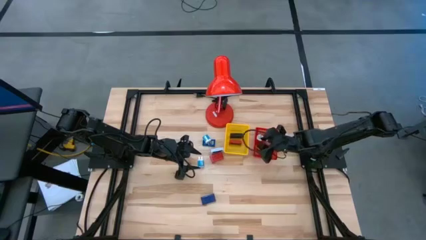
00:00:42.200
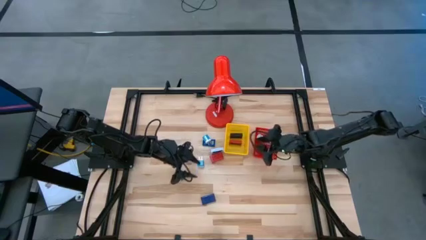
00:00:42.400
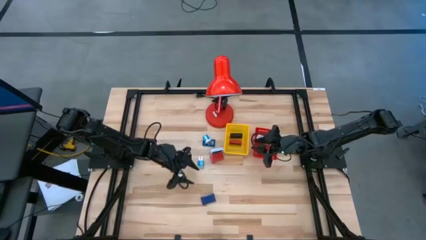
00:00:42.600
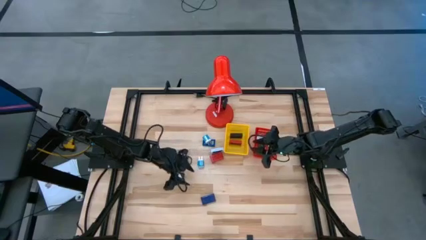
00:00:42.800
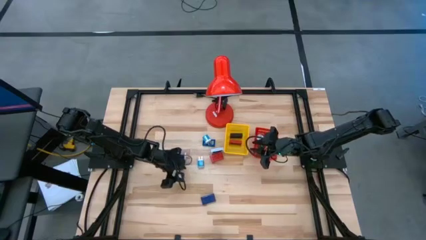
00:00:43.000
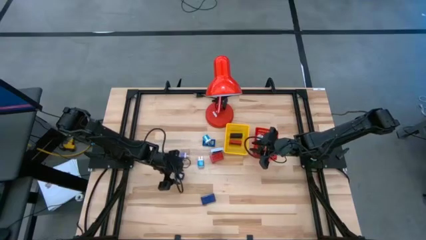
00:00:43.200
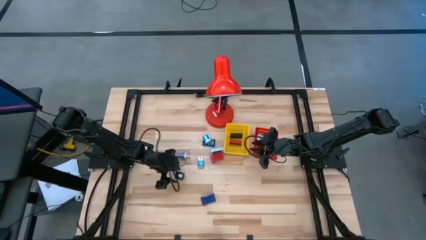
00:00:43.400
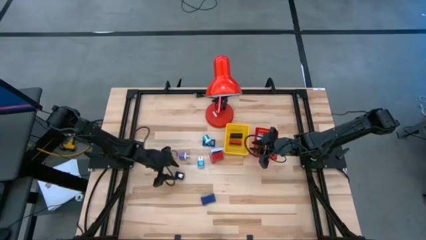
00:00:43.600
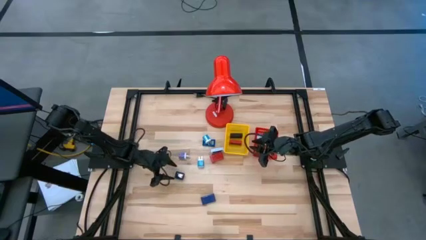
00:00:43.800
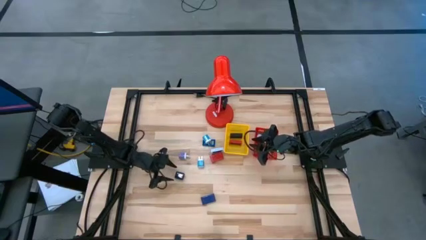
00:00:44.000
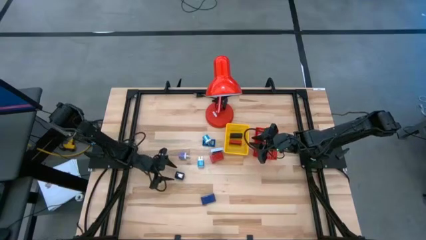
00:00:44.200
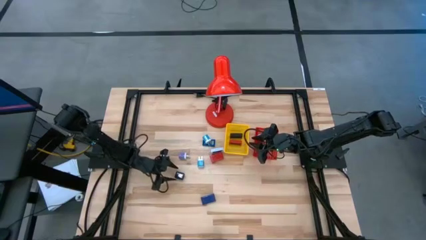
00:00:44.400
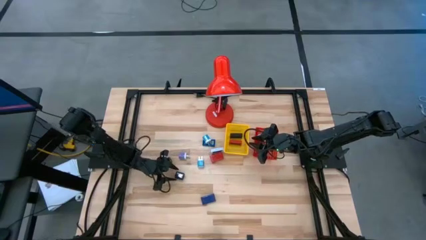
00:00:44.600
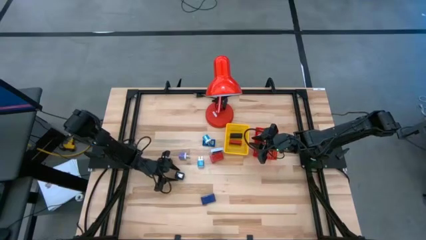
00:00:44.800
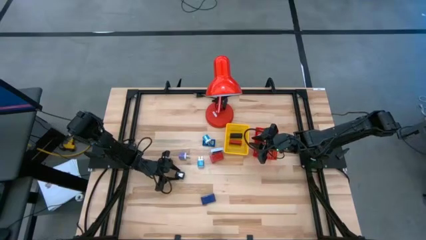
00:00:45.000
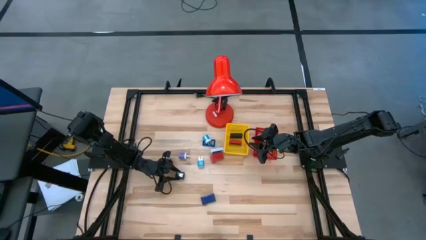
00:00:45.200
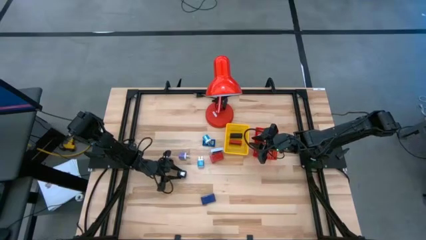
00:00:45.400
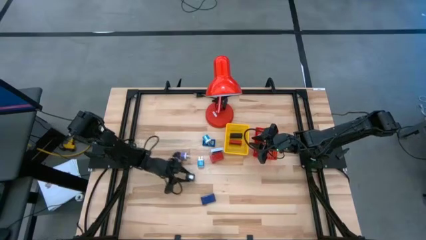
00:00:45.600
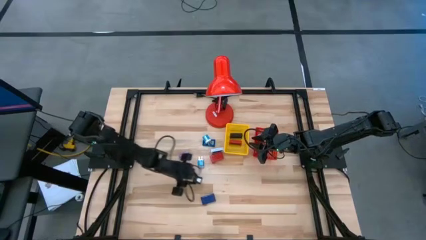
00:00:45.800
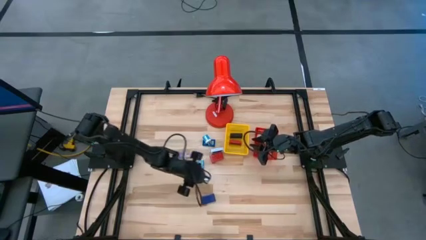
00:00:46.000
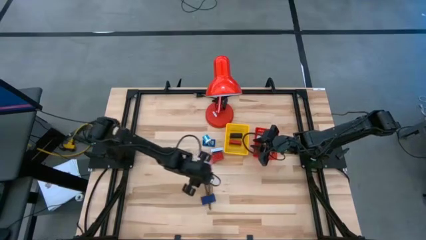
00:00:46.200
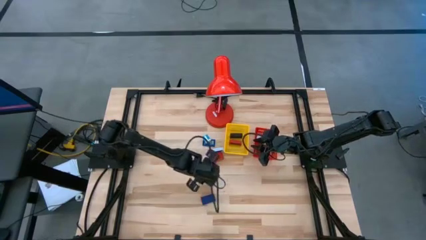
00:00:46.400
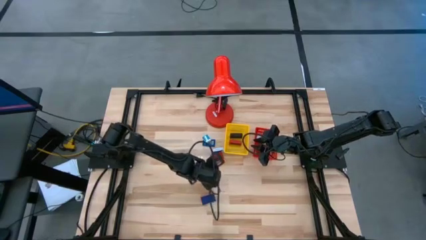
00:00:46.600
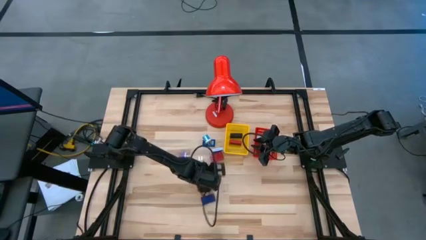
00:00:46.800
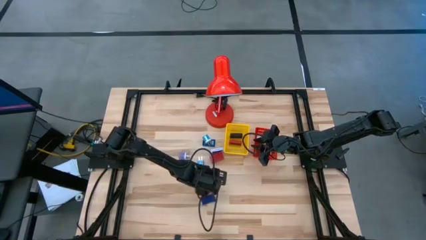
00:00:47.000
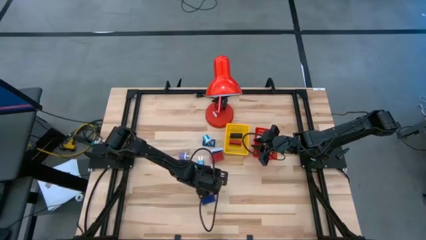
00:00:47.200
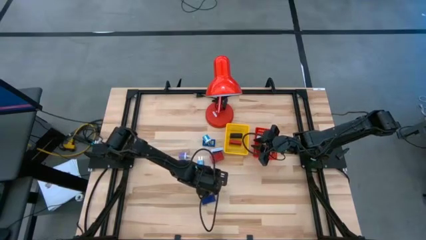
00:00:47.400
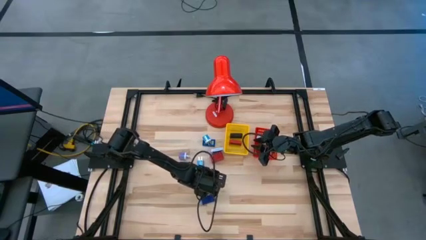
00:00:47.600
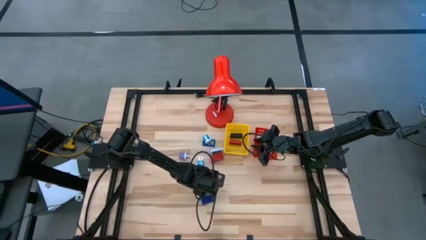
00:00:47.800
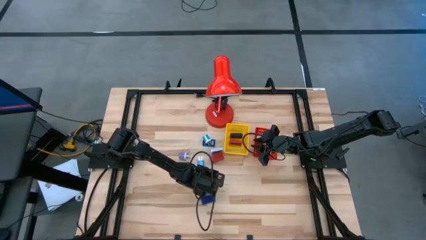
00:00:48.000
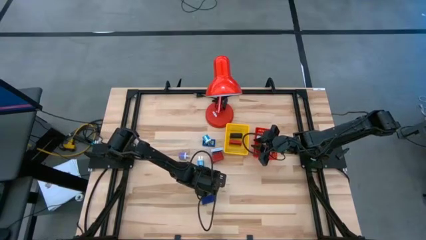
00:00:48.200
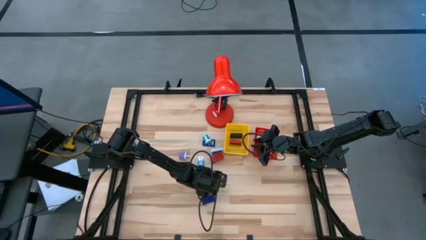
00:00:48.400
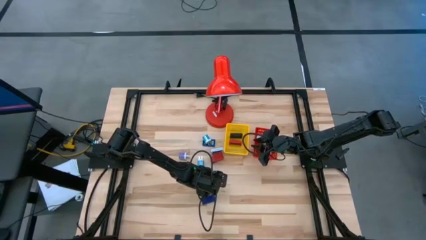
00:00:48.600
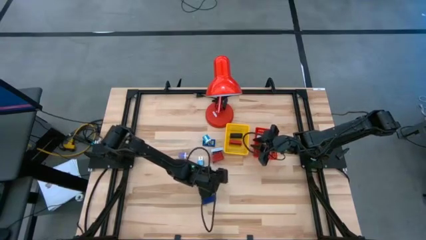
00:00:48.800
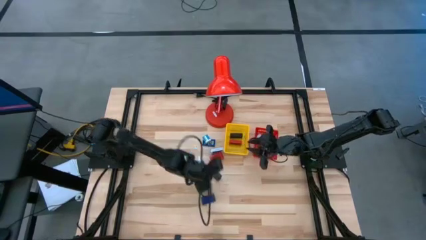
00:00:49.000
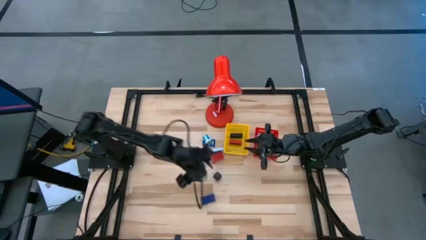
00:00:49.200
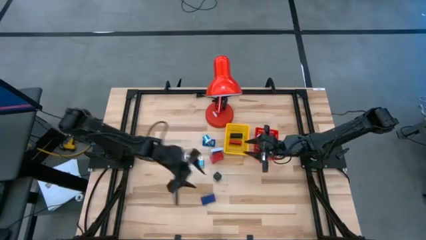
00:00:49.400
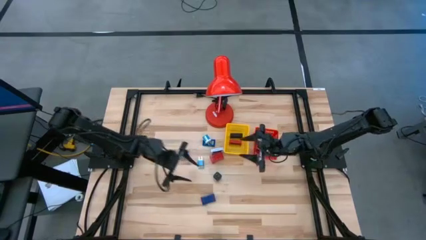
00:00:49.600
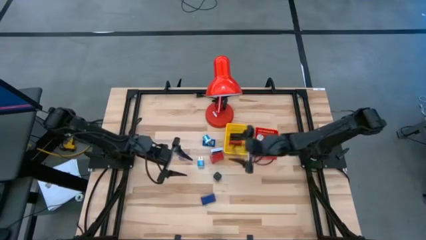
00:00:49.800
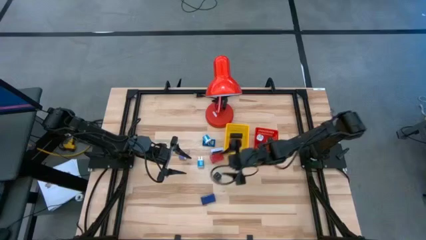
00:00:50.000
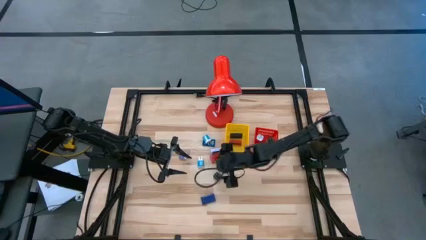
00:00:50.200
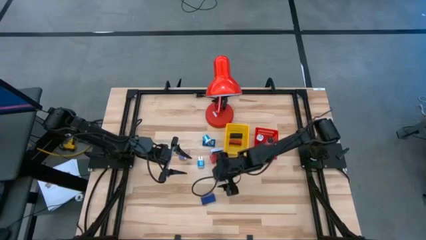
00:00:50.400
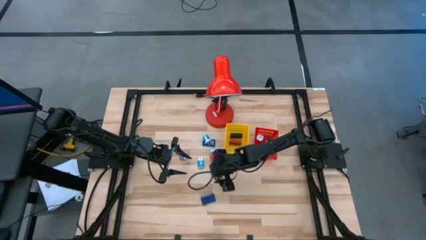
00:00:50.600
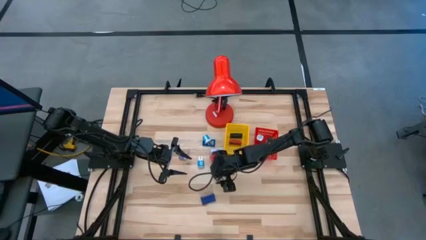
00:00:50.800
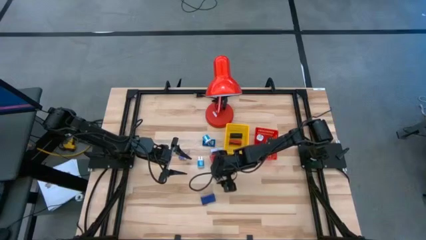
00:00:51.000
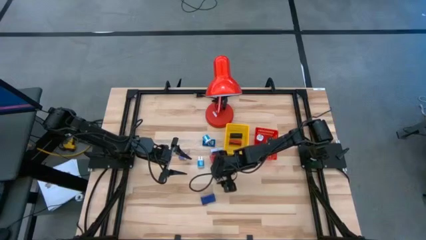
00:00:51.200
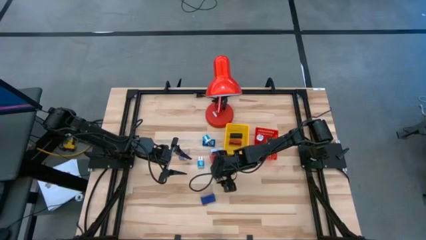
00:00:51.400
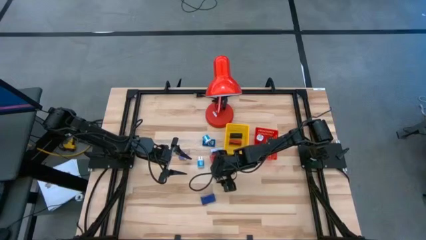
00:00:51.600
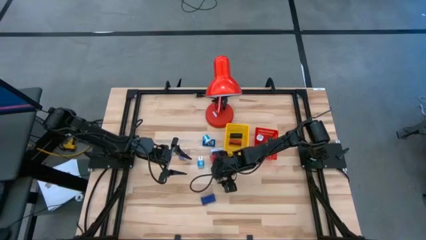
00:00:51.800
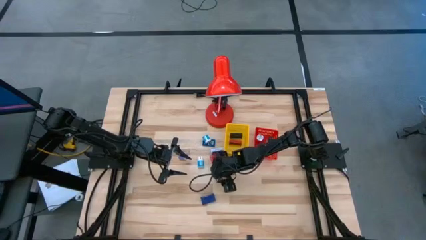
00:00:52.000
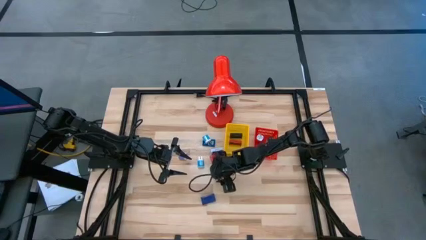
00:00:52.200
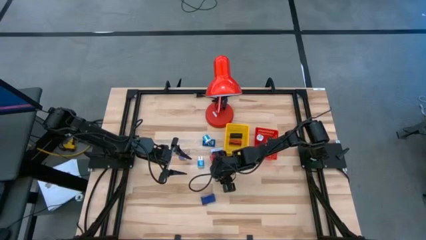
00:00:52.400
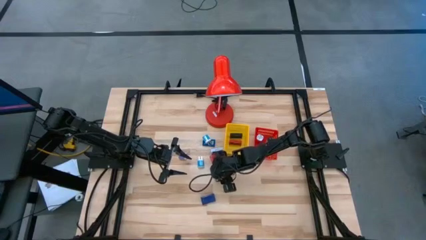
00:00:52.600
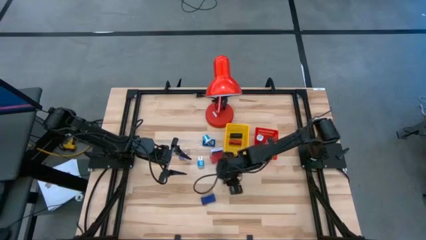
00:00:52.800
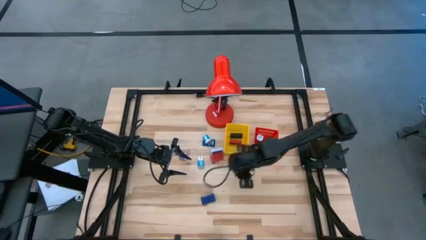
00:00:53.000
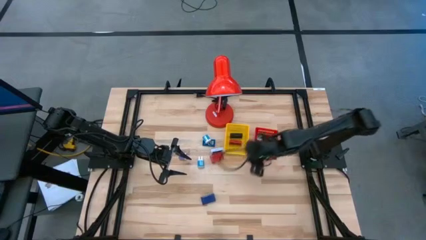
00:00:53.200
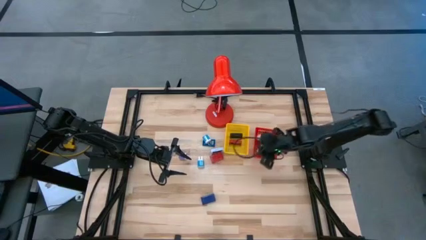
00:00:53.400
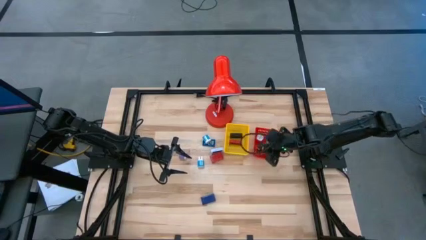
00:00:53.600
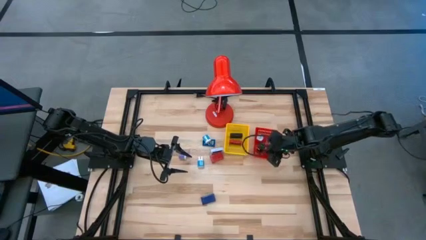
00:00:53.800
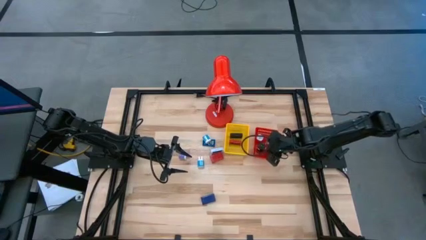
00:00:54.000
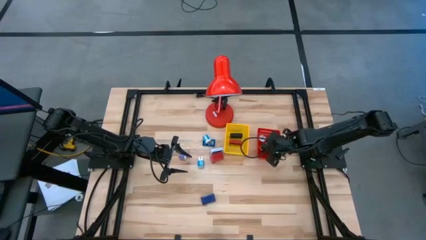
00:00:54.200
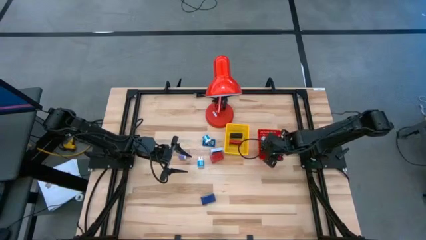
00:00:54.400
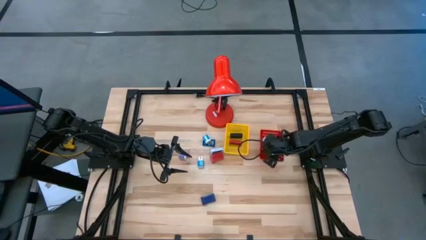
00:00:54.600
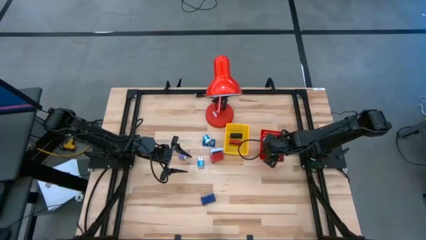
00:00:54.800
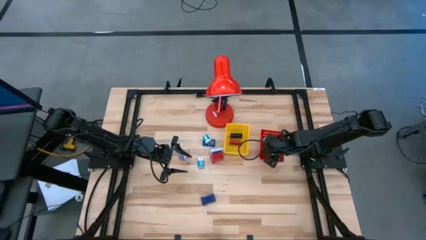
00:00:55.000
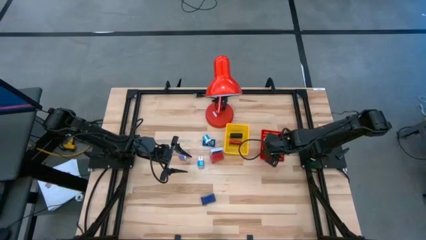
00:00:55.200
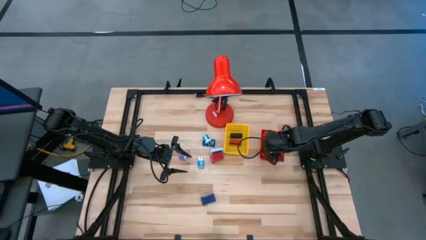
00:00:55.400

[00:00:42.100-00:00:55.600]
Task: Pick & Place Office items
Put the black charger adapter into the red bin

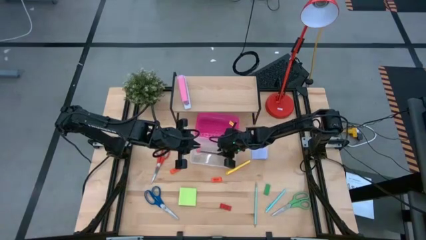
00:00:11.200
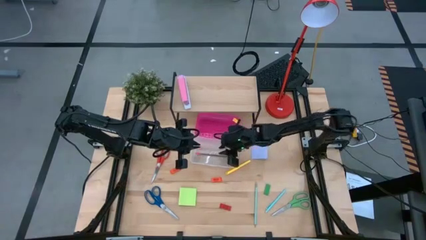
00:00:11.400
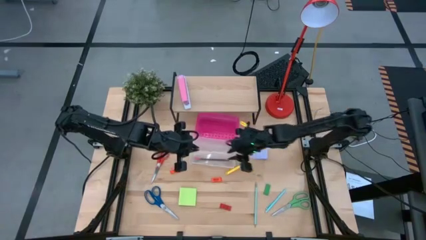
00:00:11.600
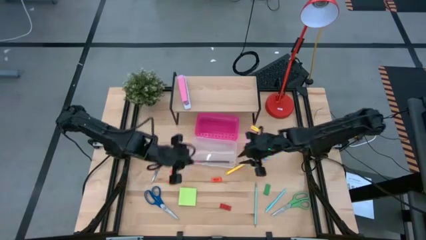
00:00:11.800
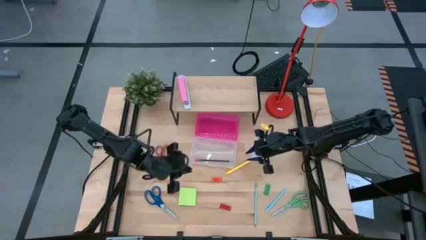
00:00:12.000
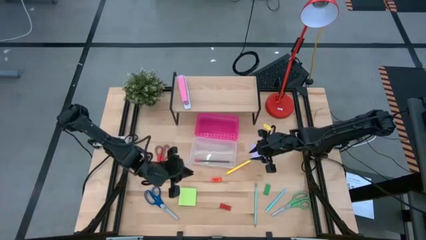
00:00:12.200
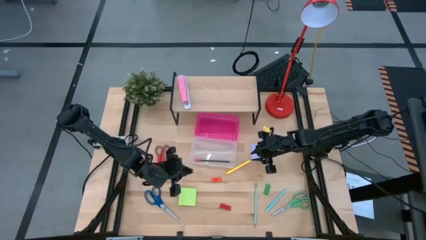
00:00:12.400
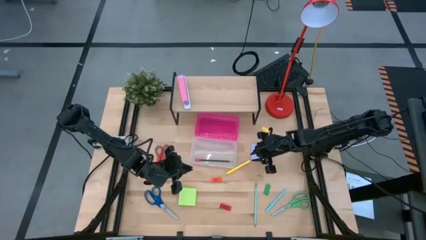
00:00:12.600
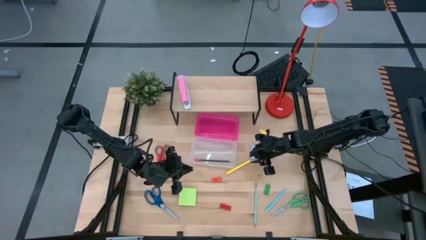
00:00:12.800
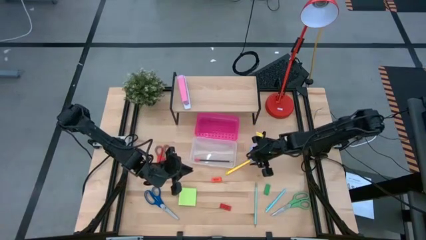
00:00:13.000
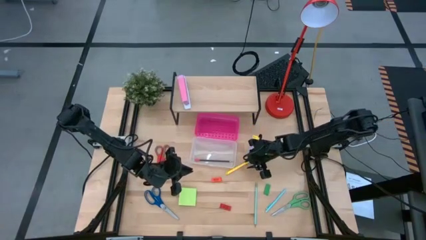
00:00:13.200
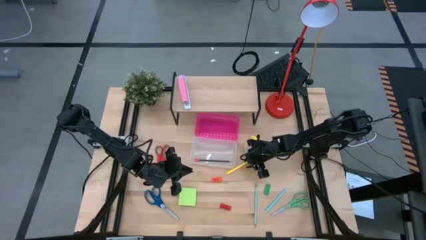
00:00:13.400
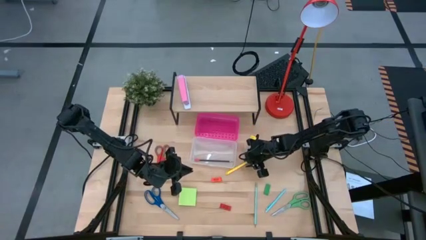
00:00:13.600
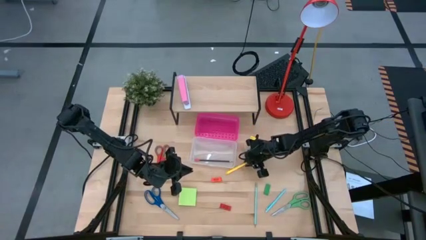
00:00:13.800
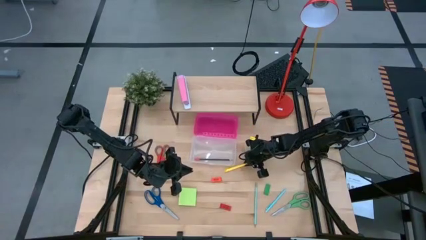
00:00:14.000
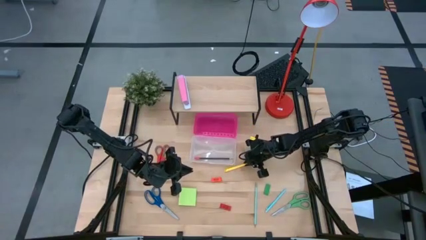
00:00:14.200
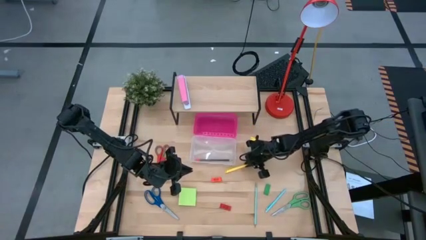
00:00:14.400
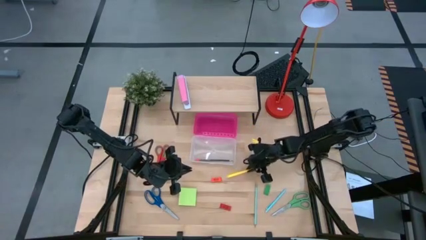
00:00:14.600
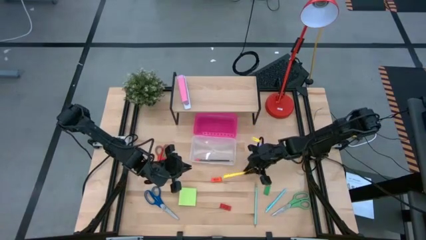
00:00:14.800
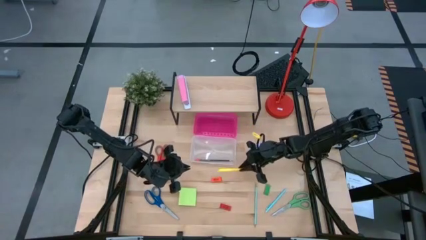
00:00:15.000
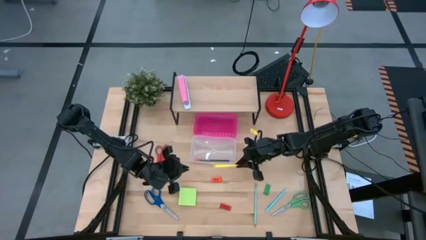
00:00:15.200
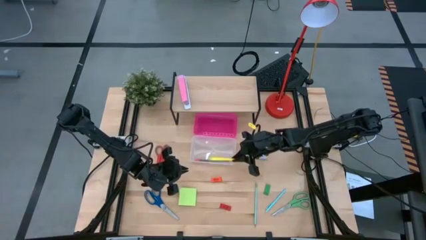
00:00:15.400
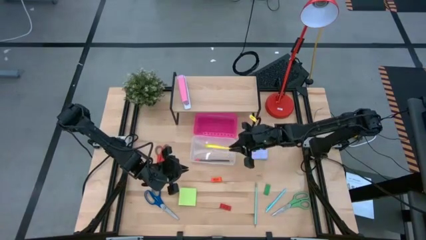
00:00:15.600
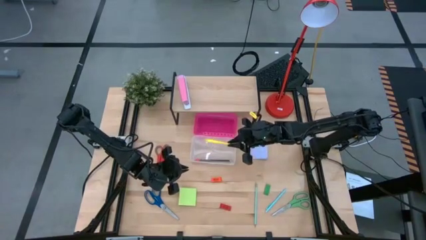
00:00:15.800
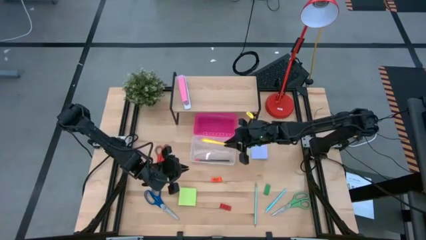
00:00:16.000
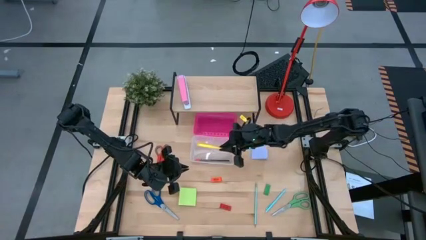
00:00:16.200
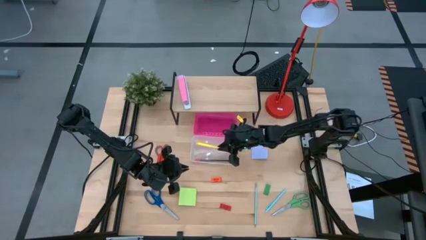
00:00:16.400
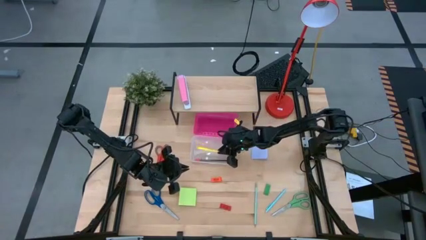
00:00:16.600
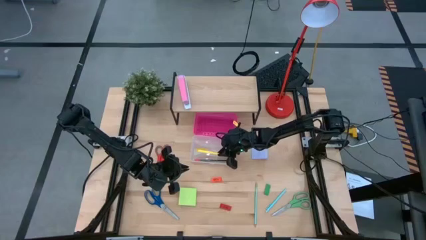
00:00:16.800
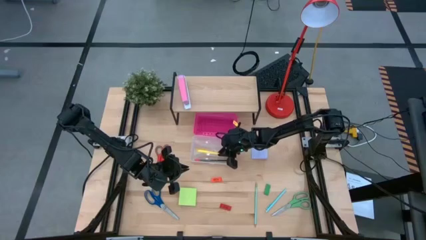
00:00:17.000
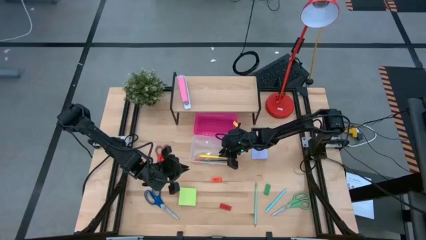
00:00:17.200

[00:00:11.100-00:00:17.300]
Task: Pack school essentials
Put the yellow pen into the supply box
